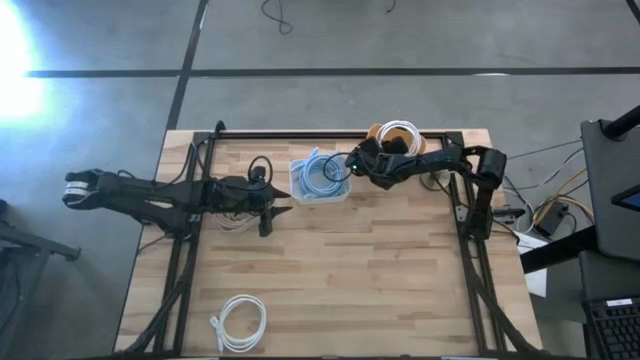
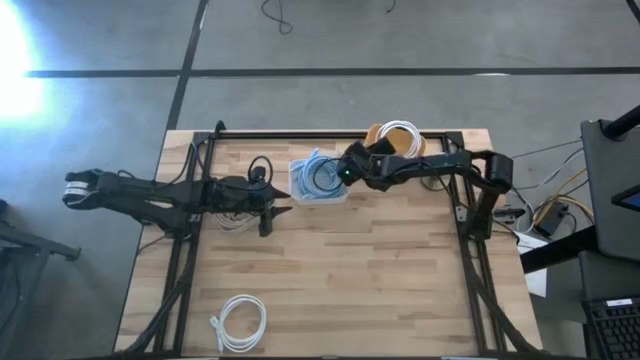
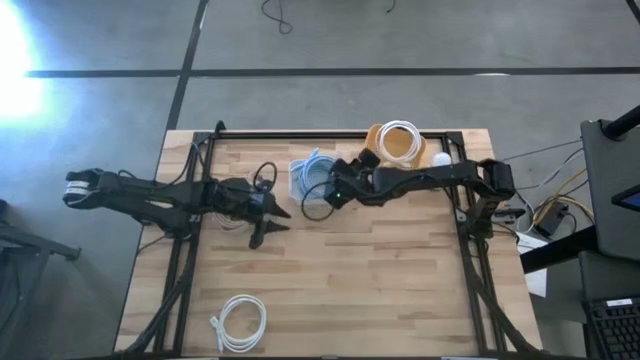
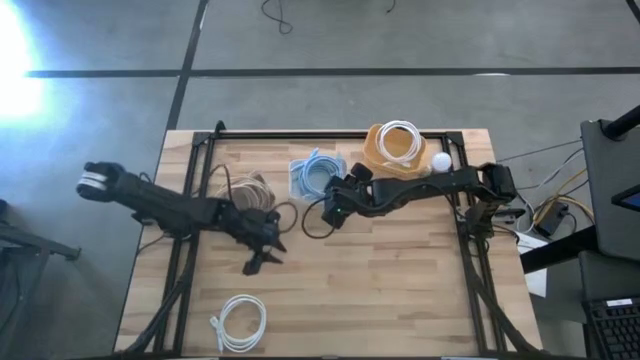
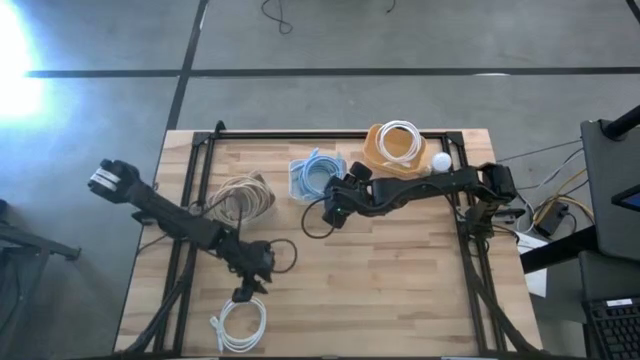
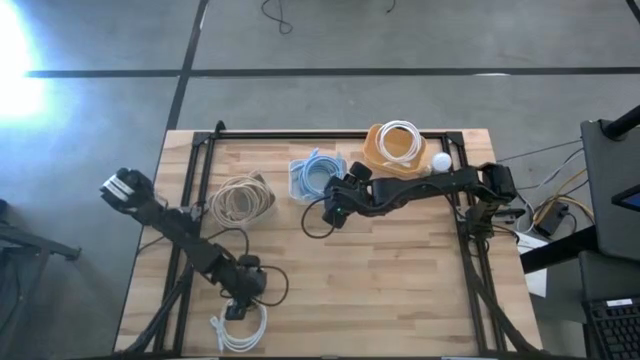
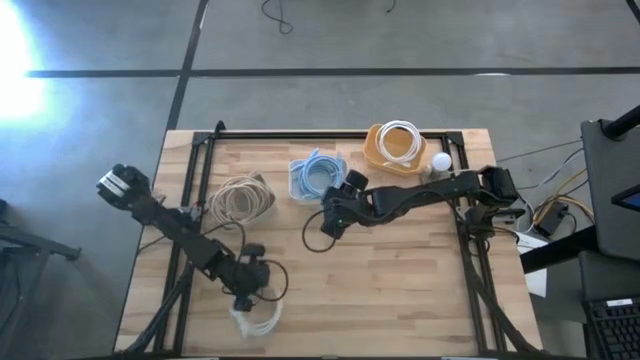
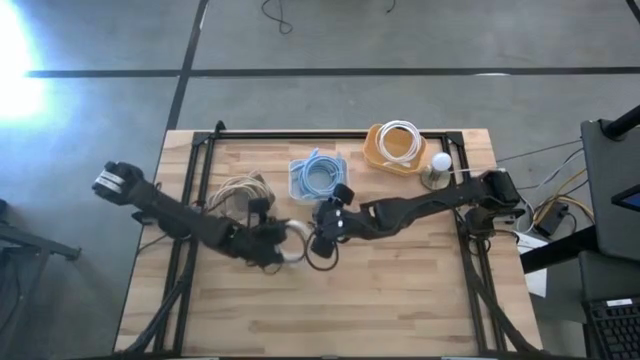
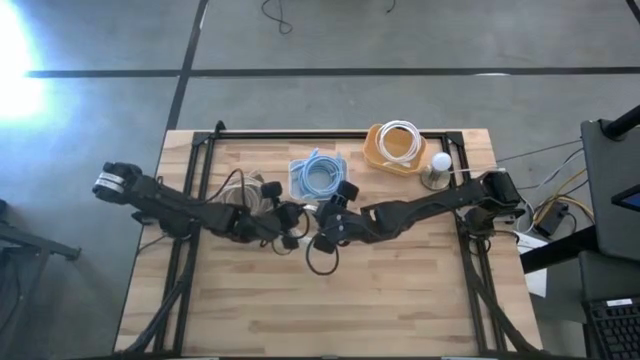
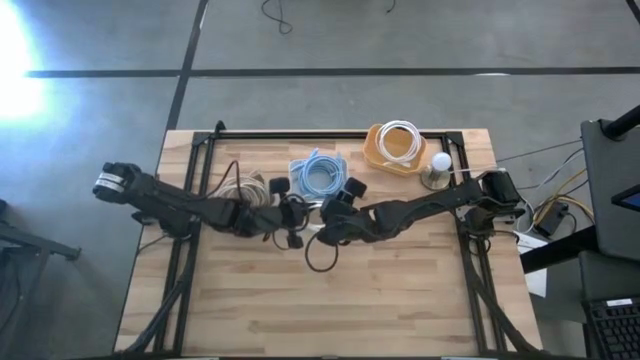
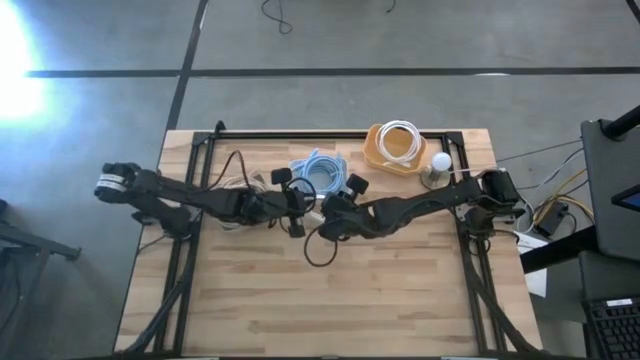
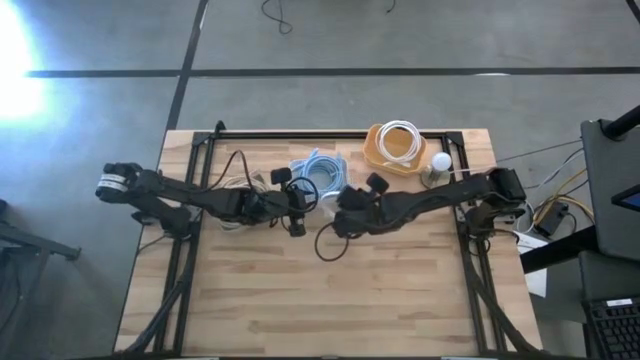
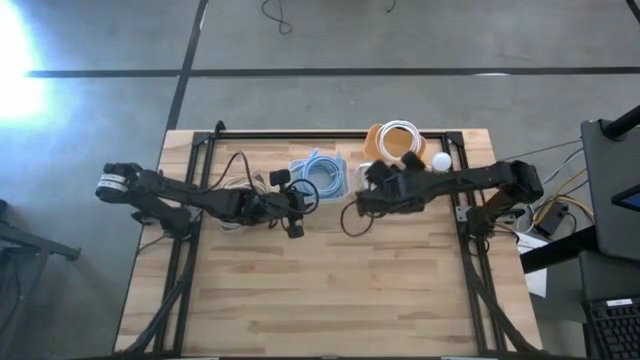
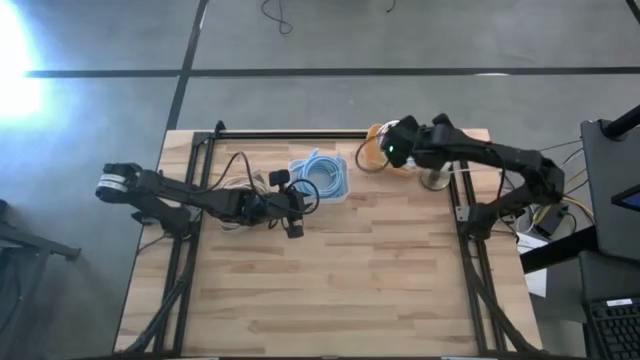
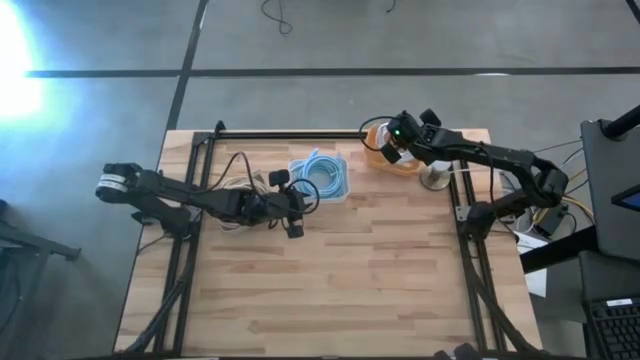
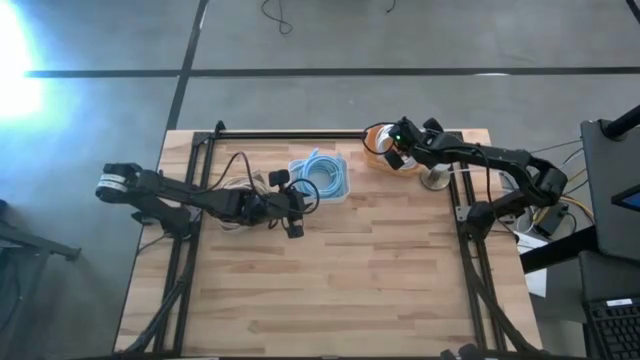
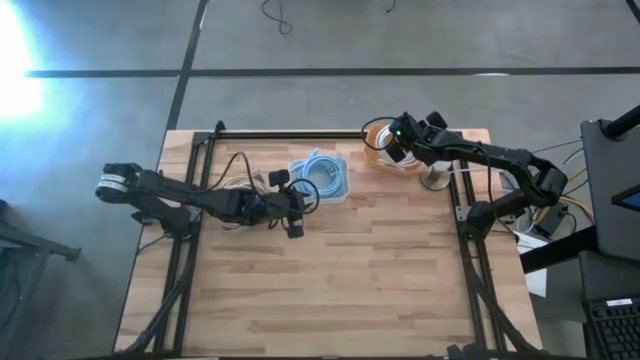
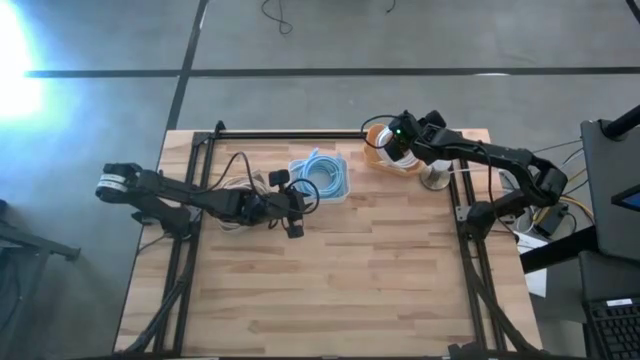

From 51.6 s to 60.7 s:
Task: Sort HDMI cables
Put the white HDMI cable into the yellow bin

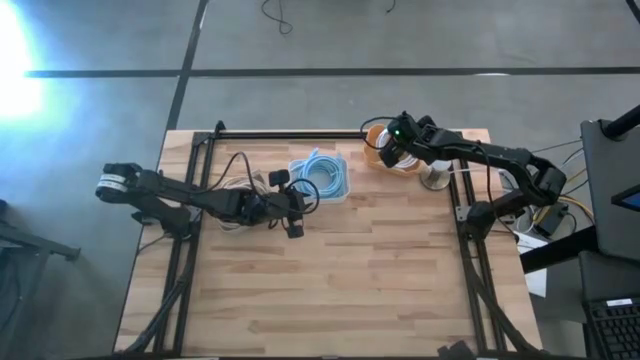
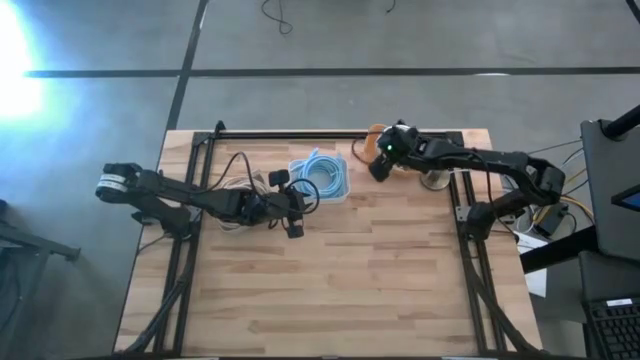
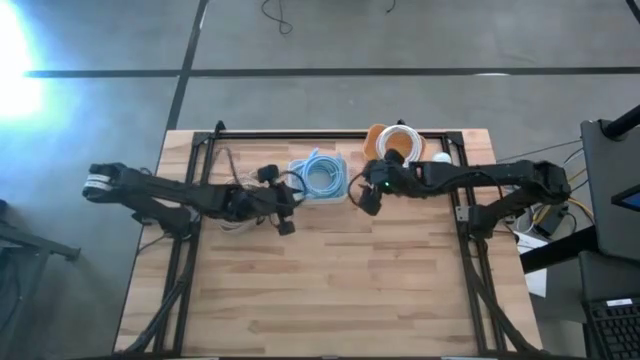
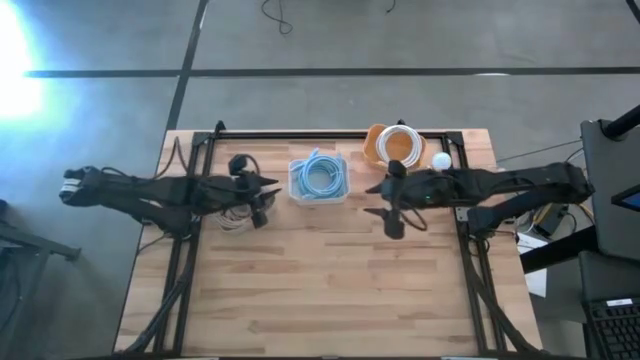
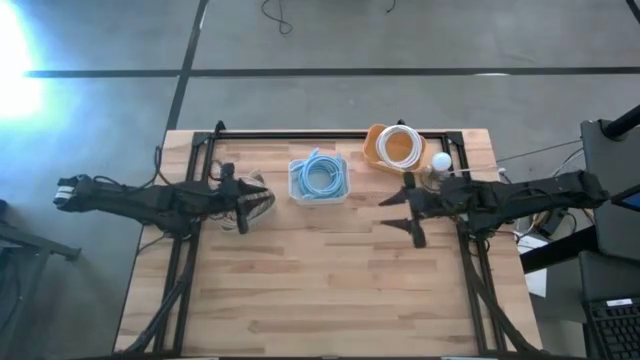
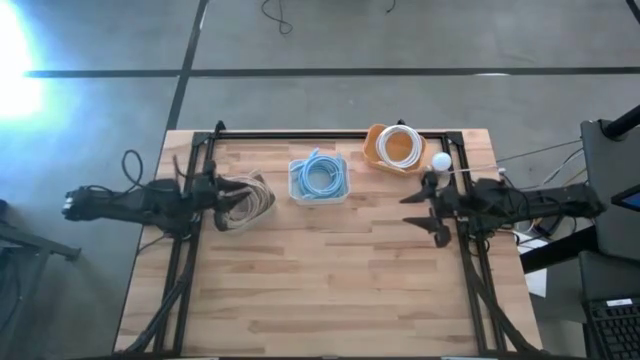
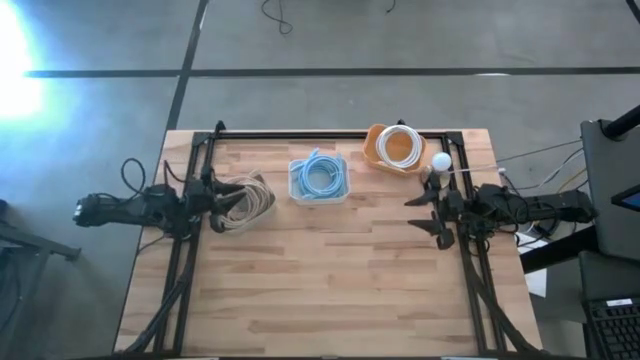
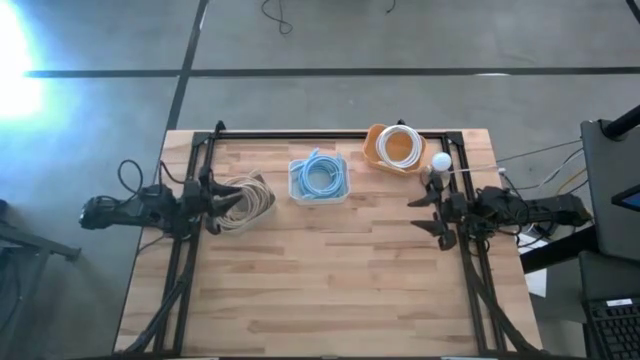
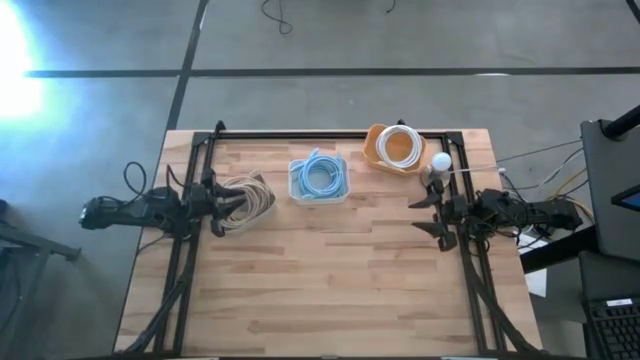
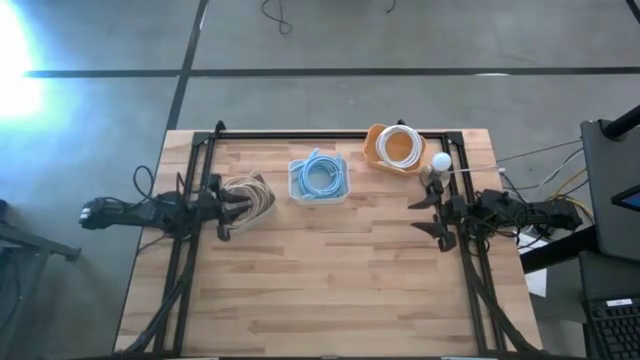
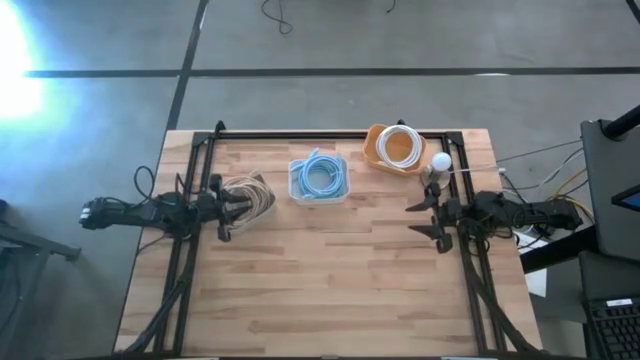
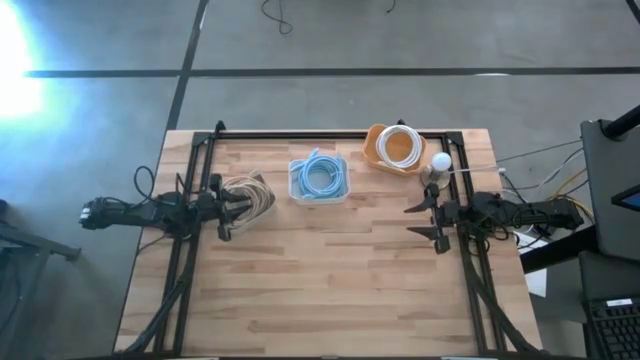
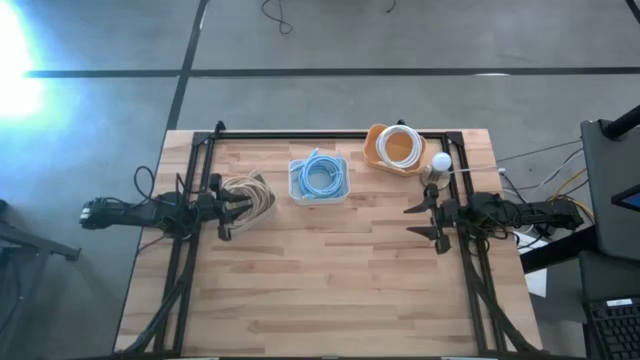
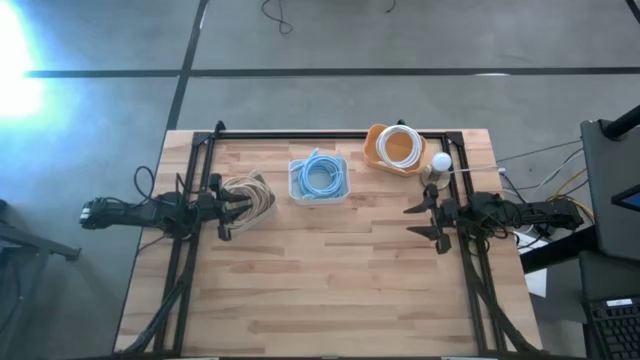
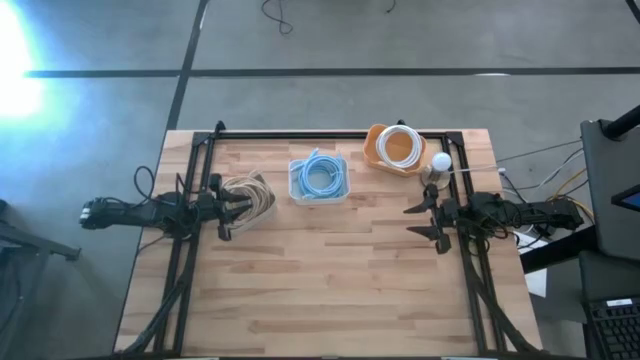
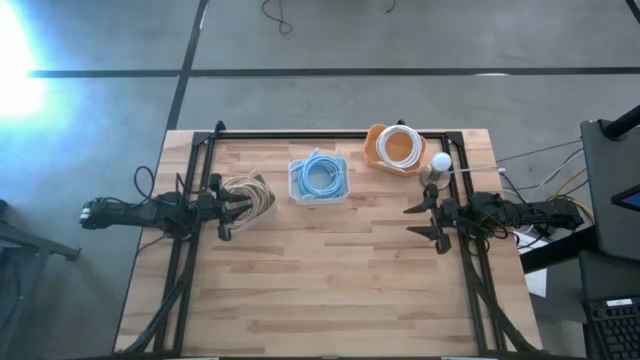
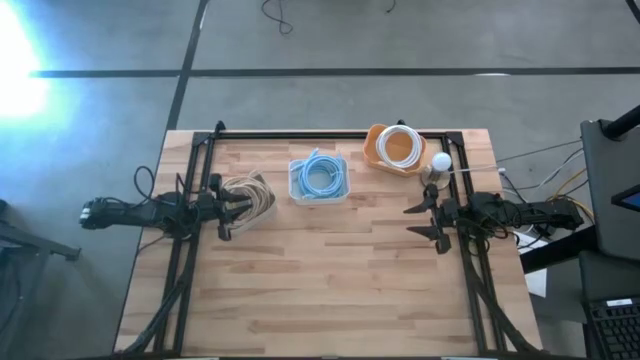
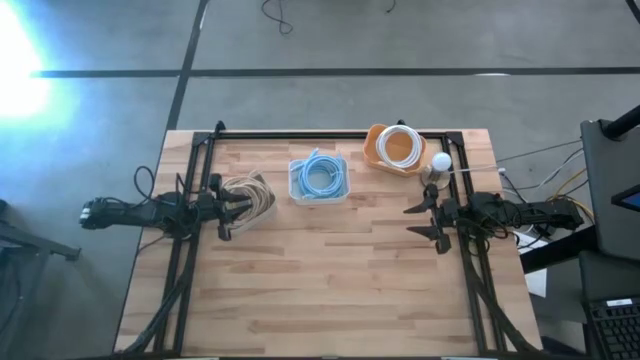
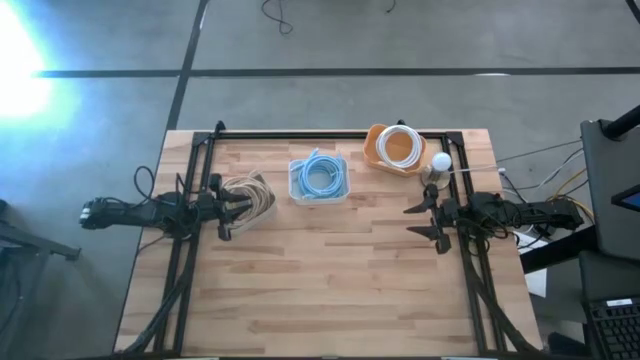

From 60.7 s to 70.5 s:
Return to Home Position

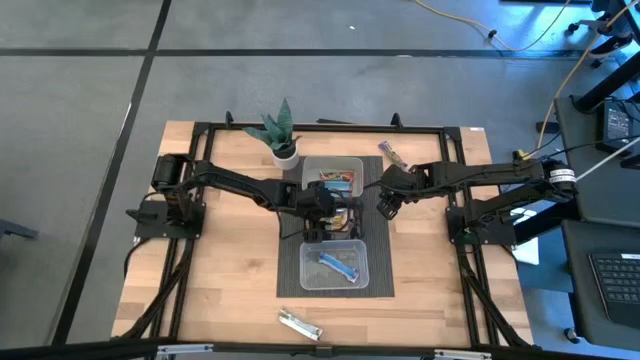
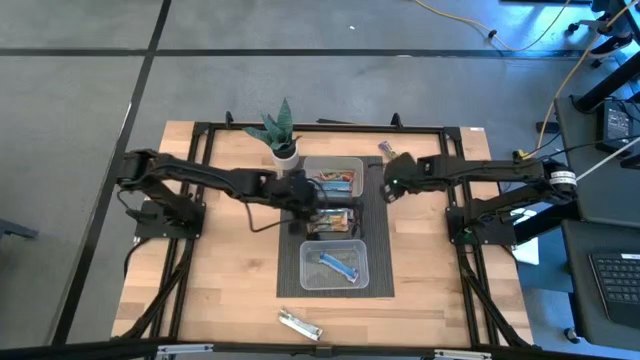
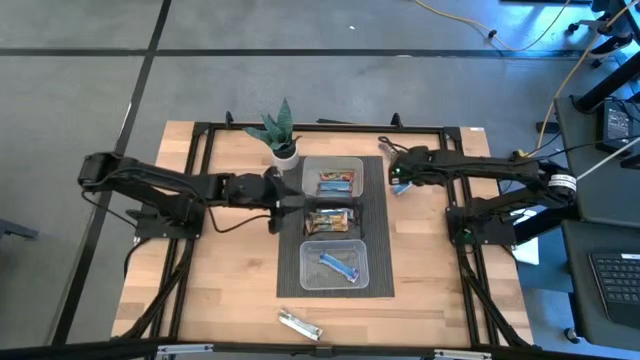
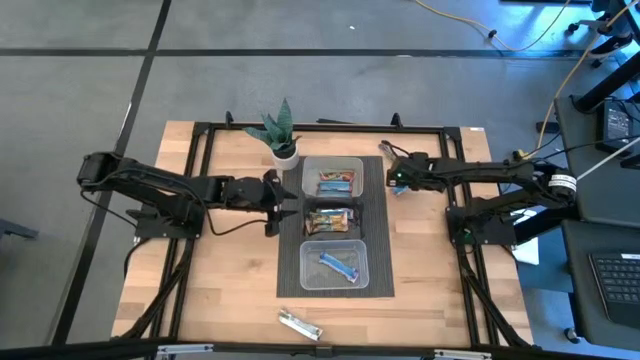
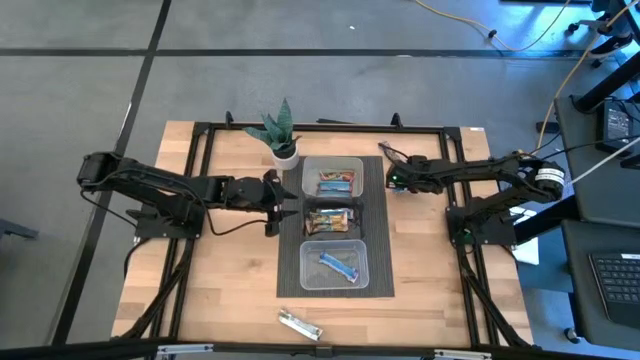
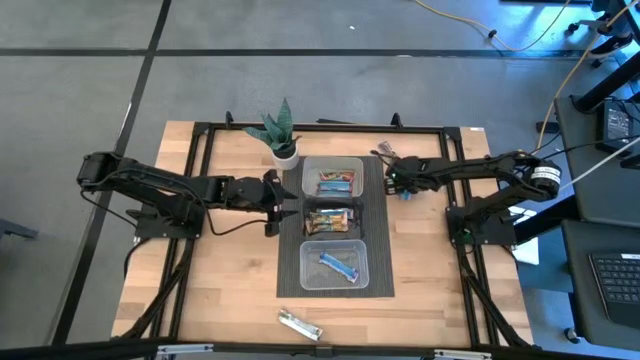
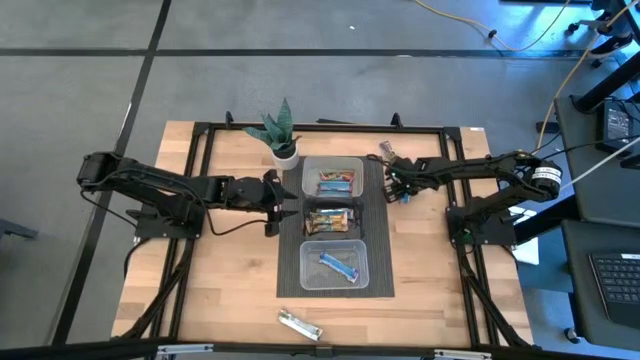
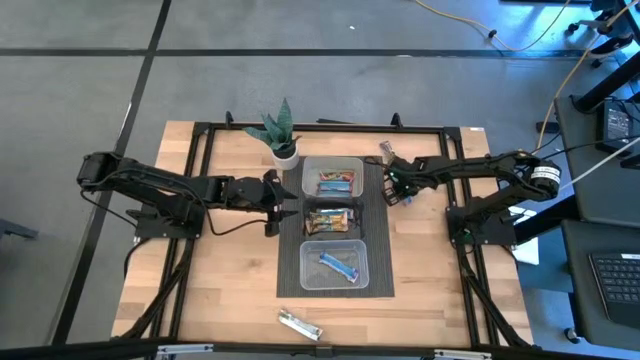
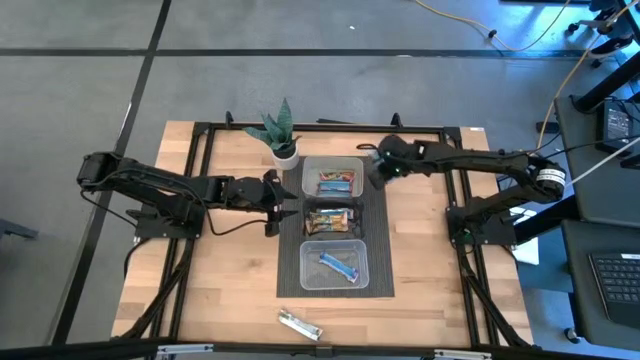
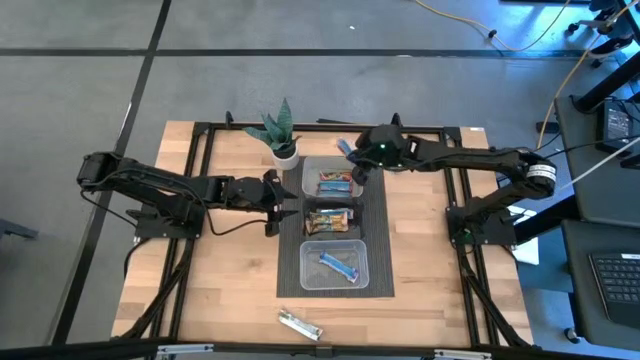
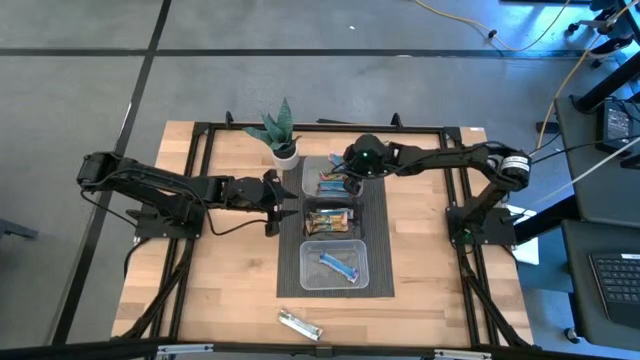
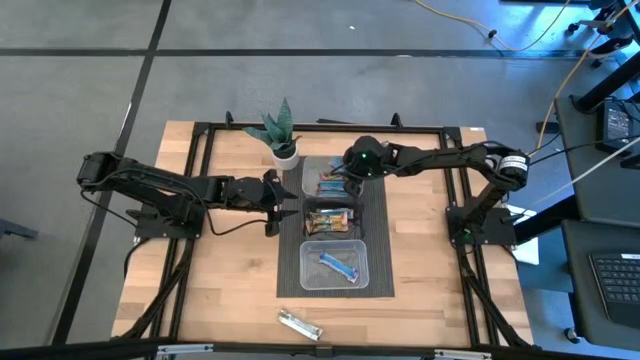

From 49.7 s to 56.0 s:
Task: Pick and place Granola Bars by type
Put the red granola bar into the gray bin
